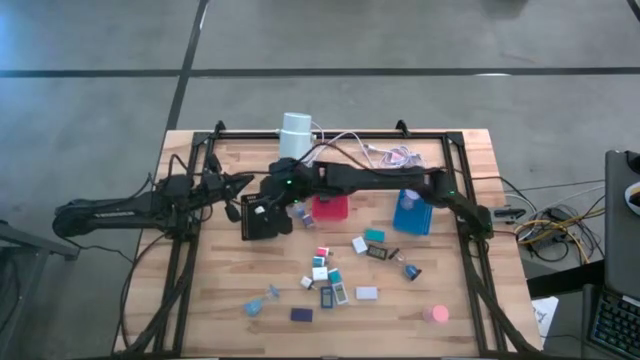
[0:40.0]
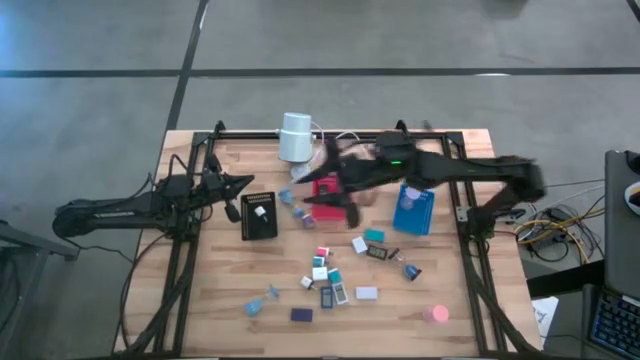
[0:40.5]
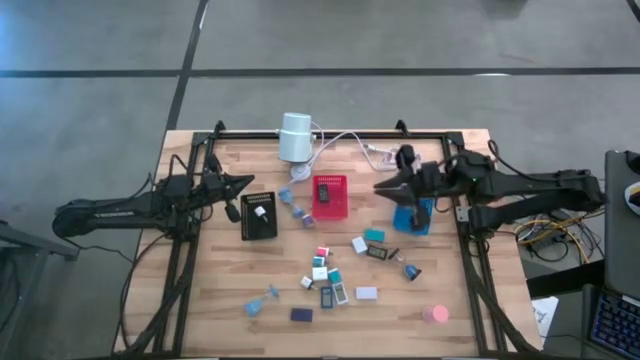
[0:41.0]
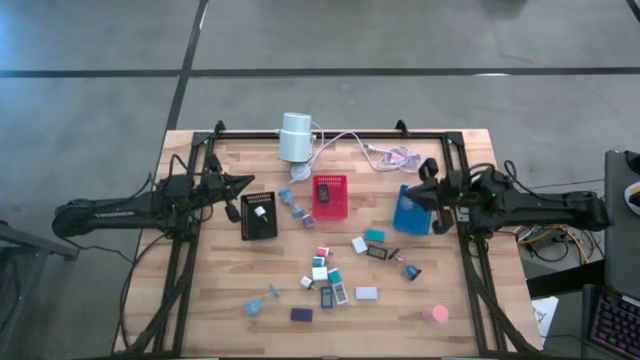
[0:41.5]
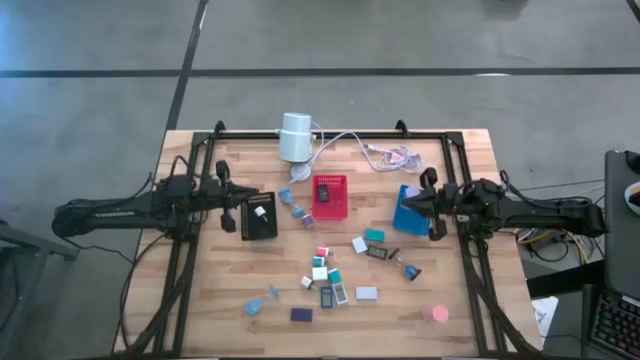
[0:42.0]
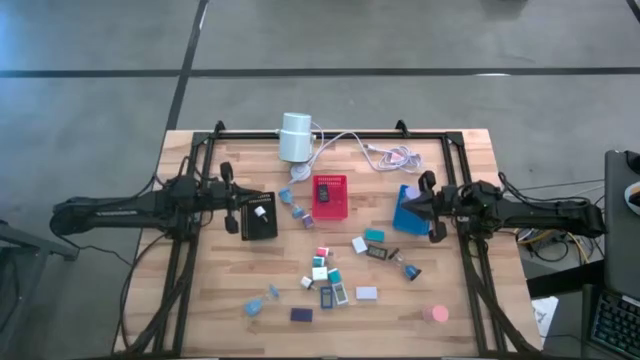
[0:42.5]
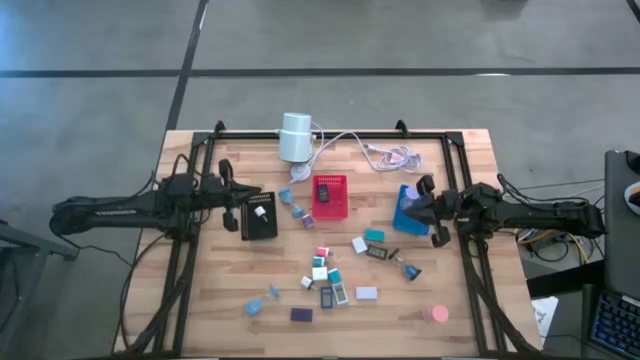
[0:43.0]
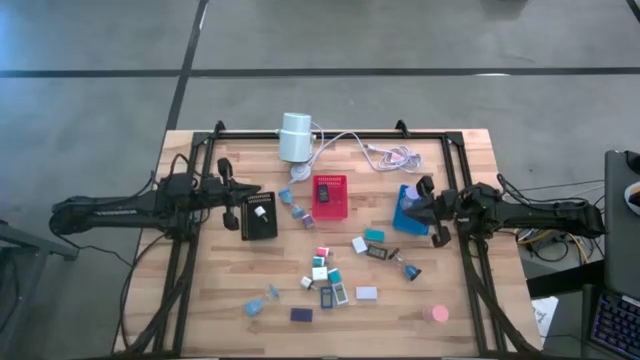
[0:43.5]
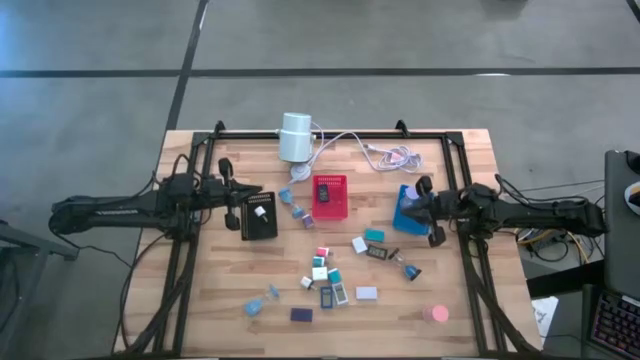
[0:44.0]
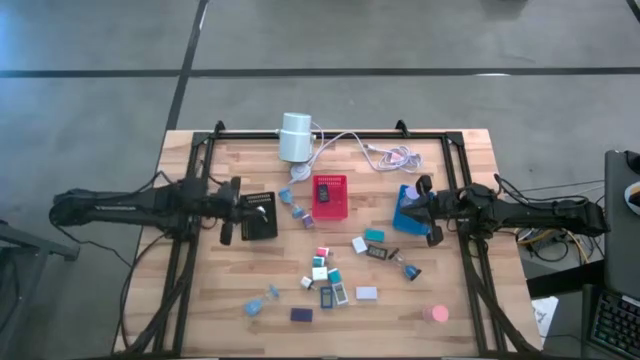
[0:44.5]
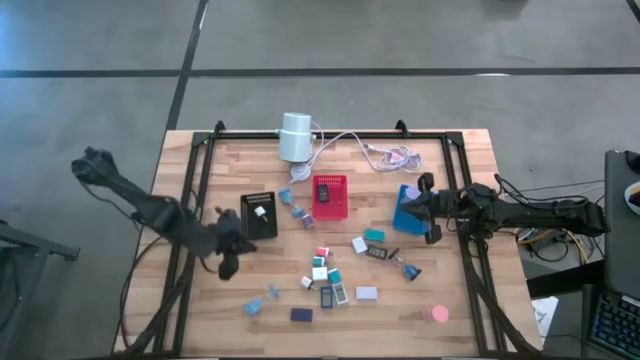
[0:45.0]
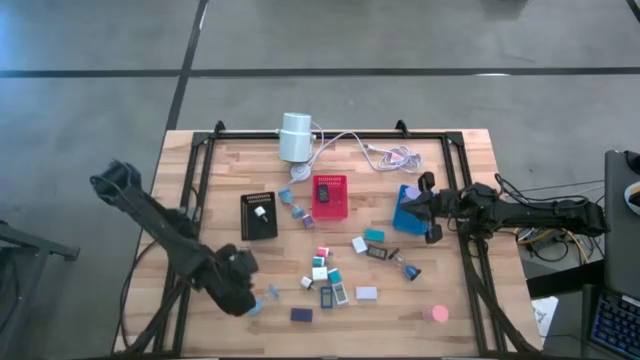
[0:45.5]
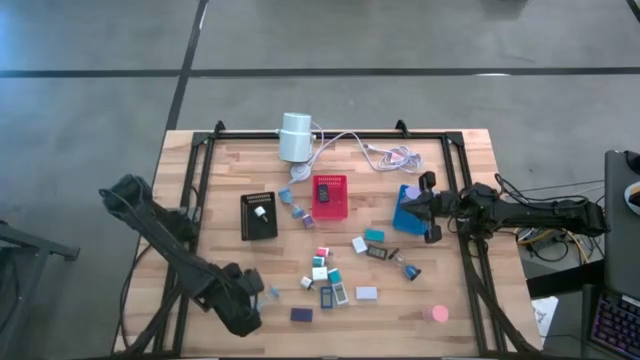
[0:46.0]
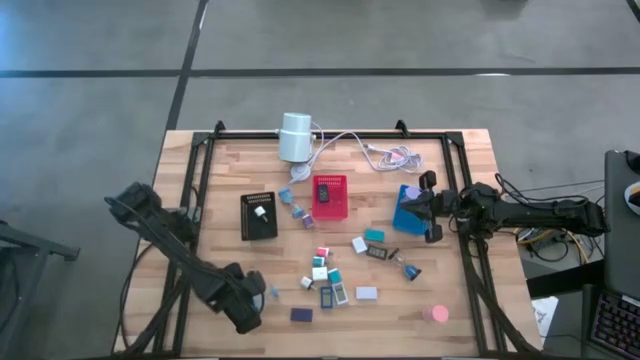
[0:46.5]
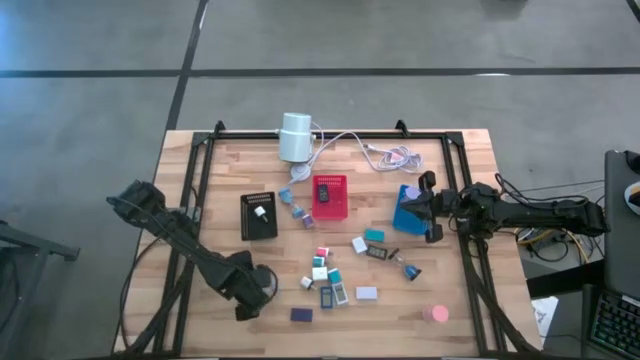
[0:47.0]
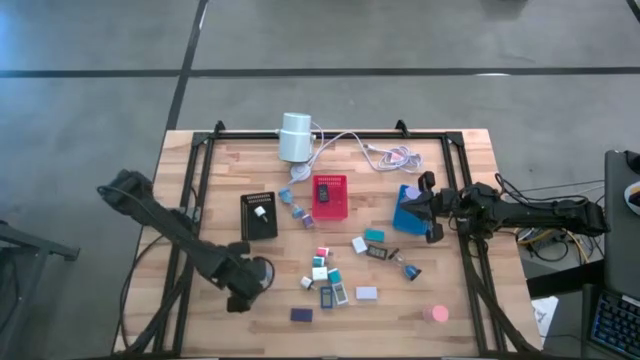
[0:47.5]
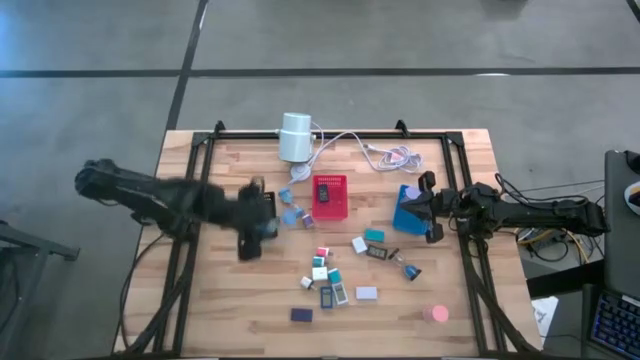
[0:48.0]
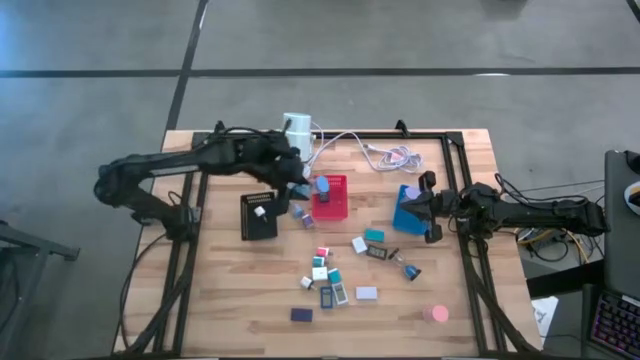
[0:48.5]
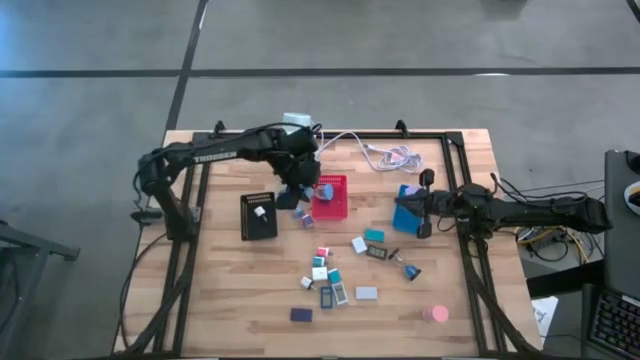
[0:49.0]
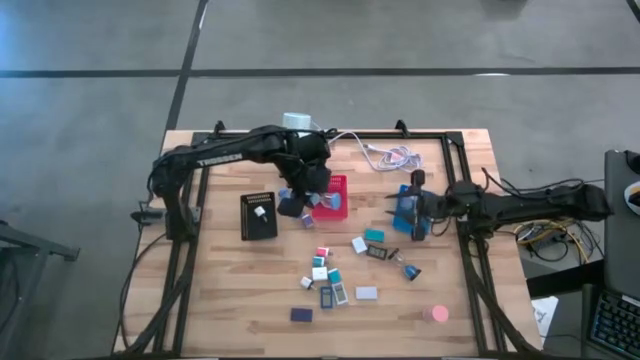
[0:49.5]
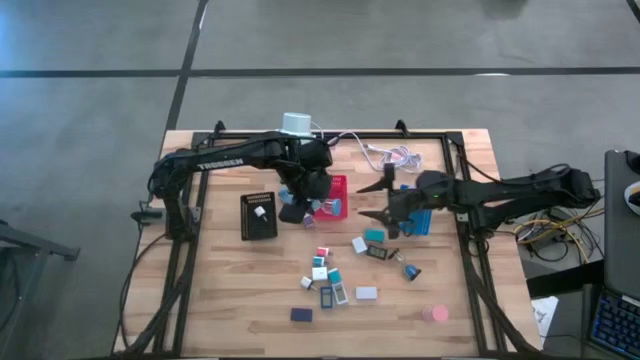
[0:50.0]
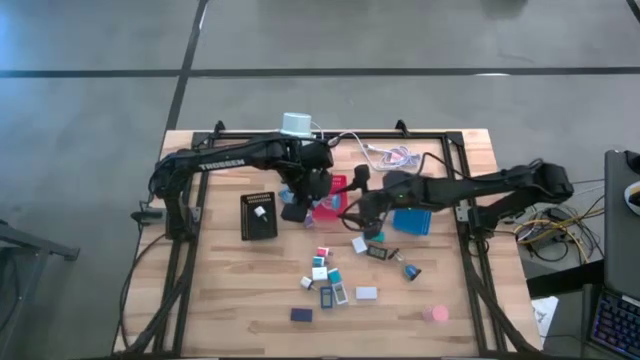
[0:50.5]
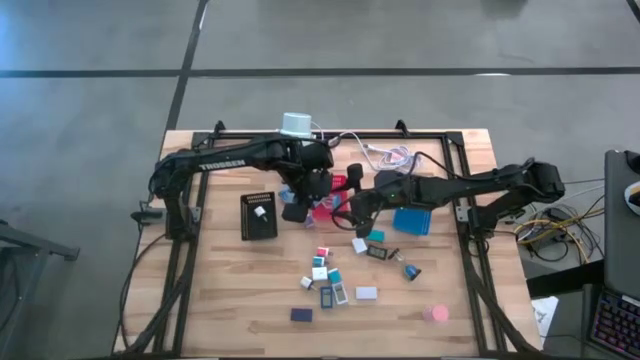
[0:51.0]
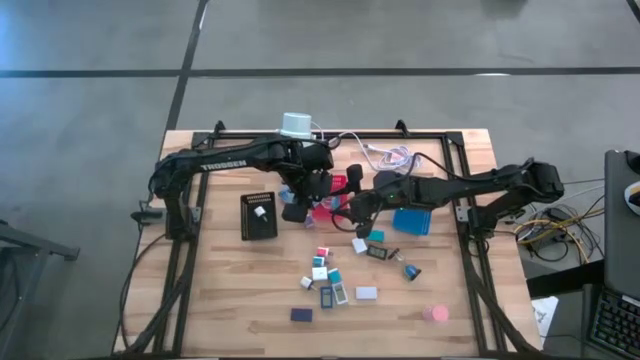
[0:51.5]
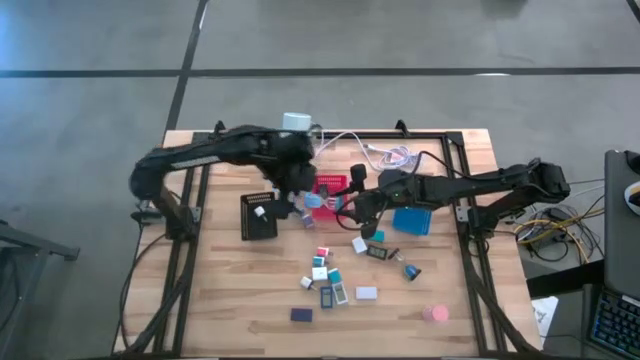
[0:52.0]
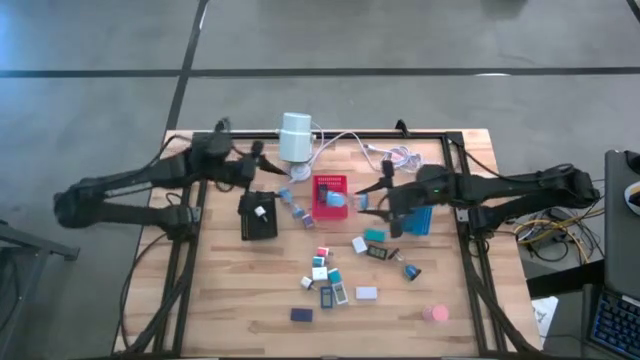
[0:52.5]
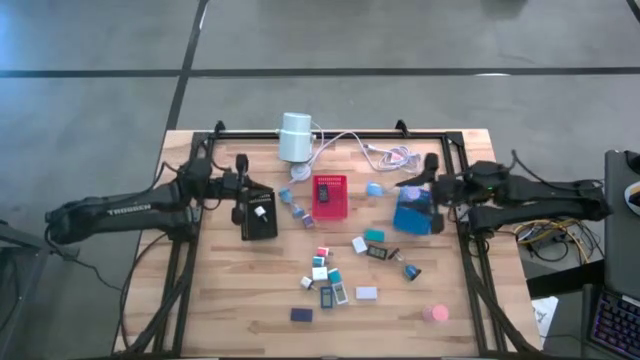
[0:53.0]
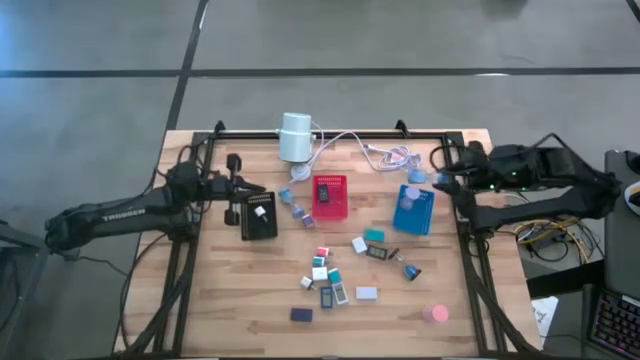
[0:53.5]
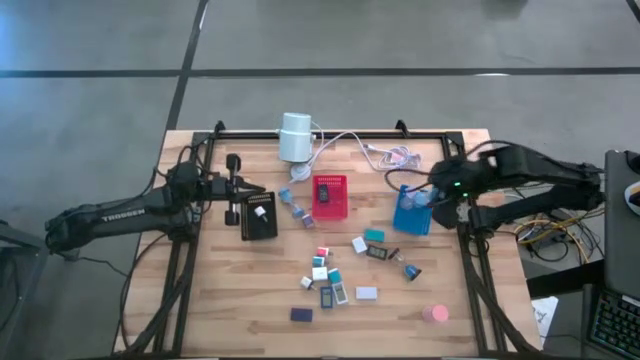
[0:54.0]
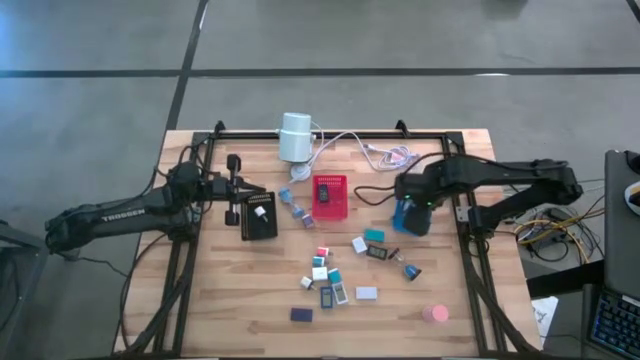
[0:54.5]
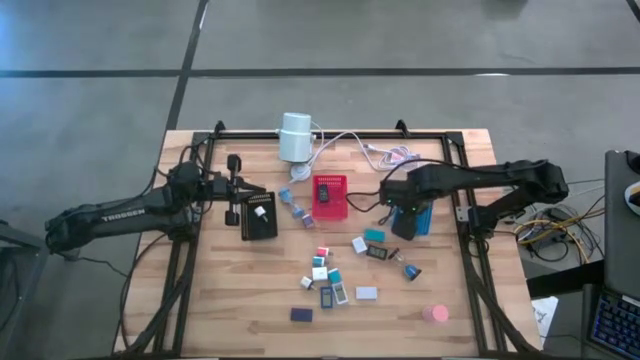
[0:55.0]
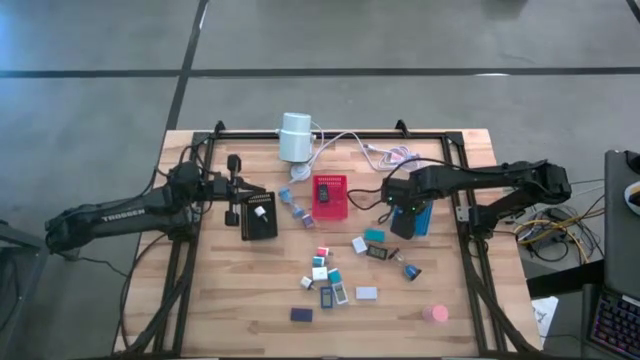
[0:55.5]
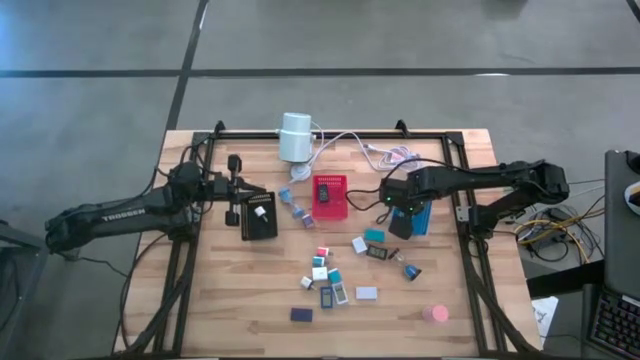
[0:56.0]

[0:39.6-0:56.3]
Task: Pick & Place Office items
Put the bottom light blue hourglass into the blue basket
